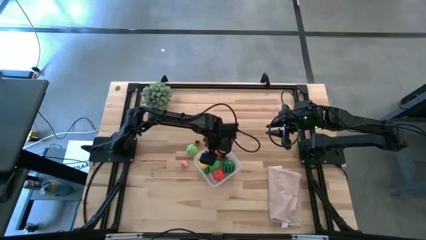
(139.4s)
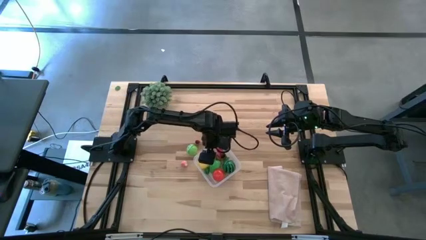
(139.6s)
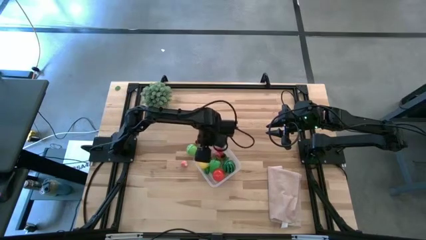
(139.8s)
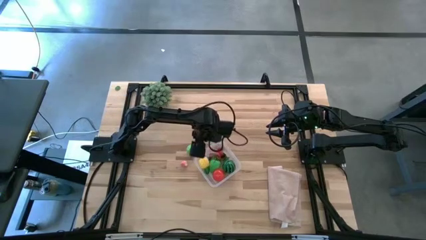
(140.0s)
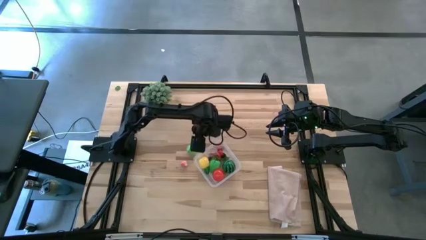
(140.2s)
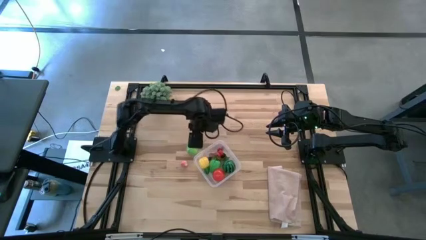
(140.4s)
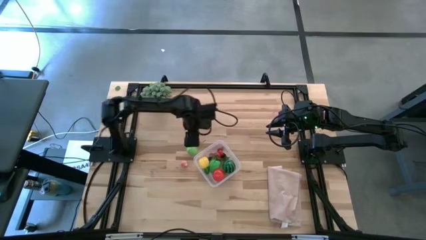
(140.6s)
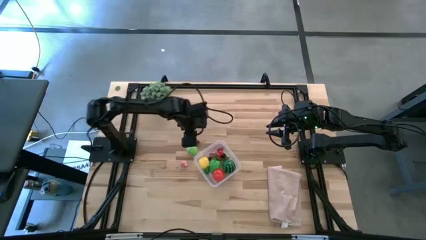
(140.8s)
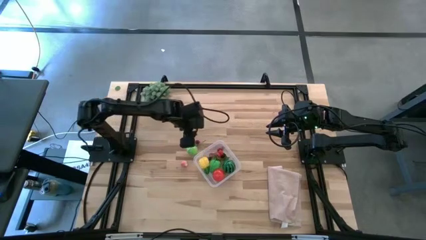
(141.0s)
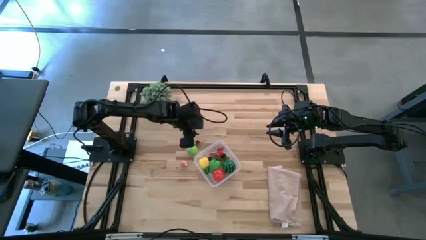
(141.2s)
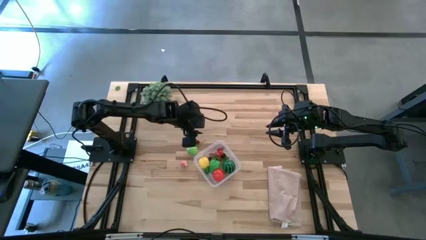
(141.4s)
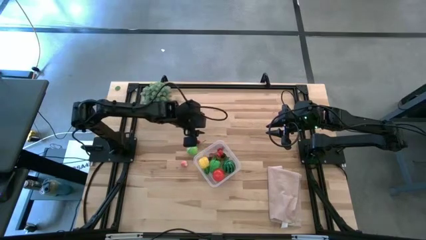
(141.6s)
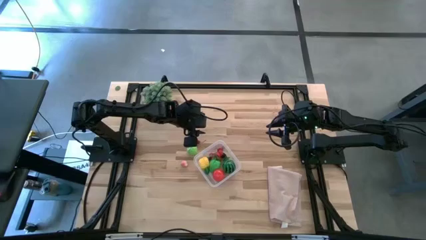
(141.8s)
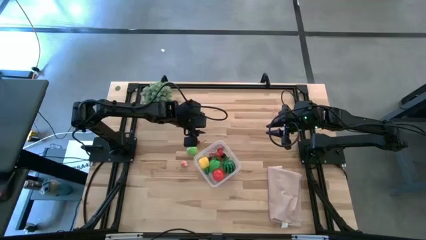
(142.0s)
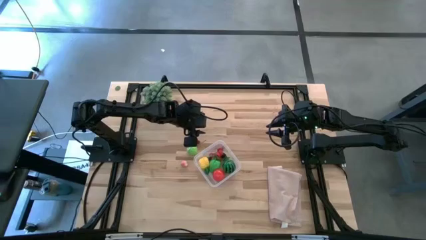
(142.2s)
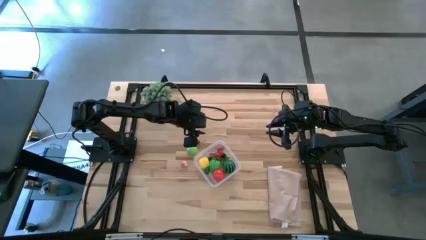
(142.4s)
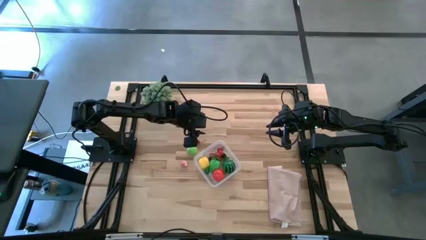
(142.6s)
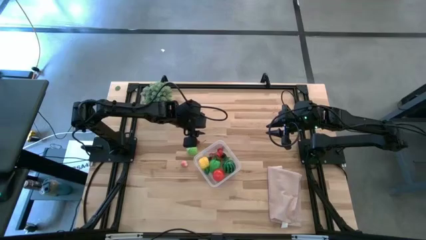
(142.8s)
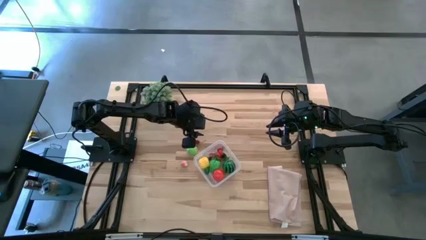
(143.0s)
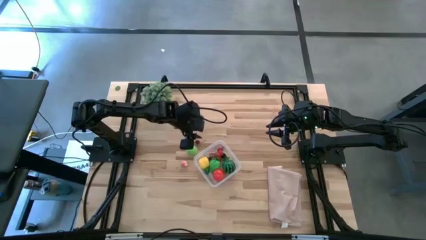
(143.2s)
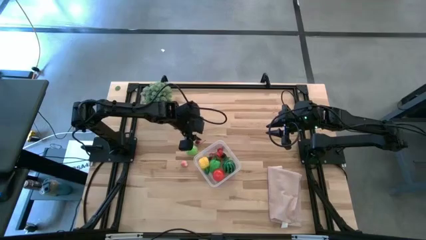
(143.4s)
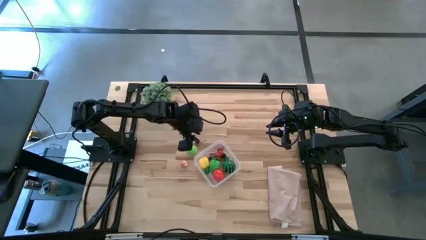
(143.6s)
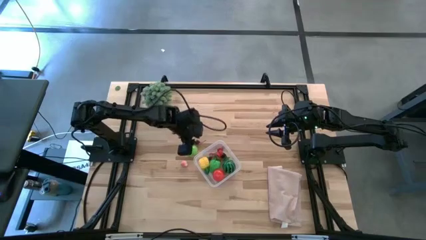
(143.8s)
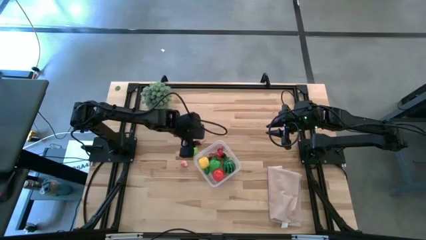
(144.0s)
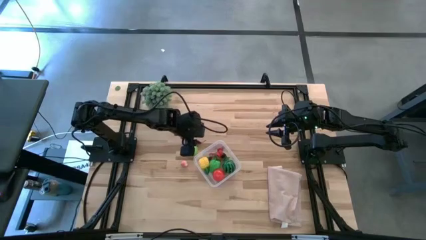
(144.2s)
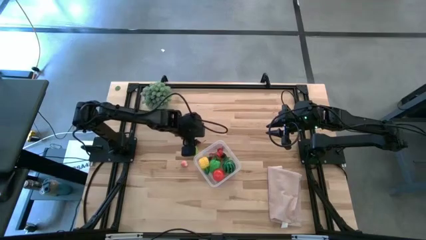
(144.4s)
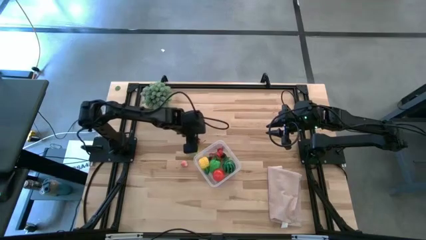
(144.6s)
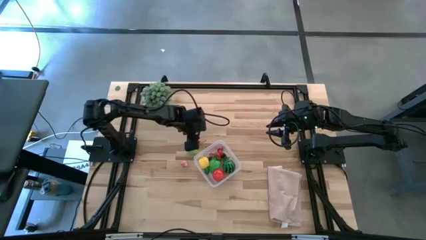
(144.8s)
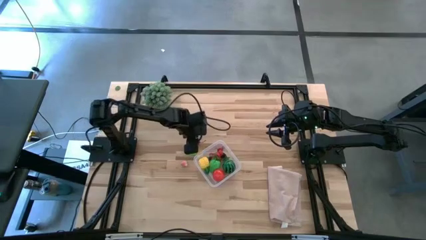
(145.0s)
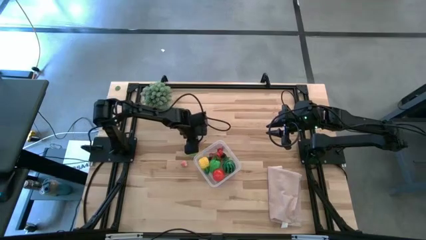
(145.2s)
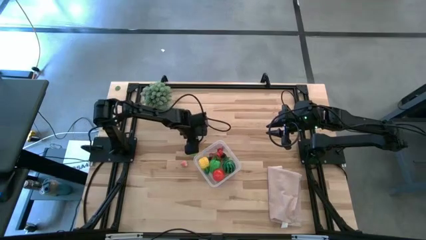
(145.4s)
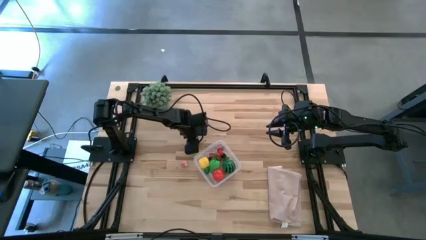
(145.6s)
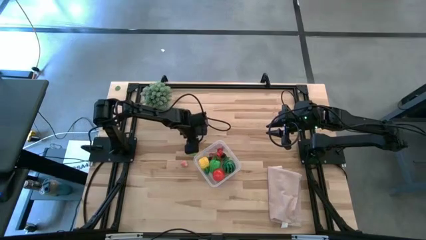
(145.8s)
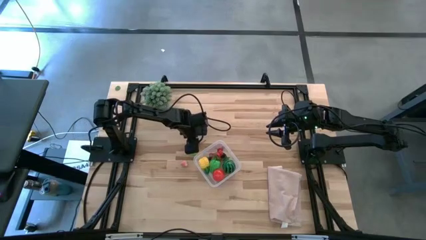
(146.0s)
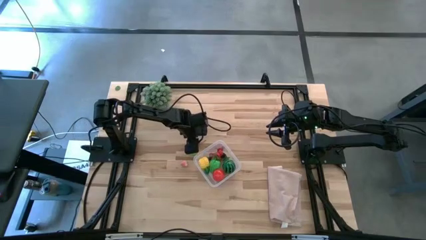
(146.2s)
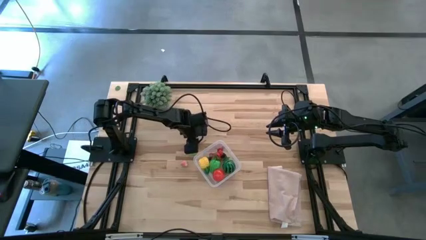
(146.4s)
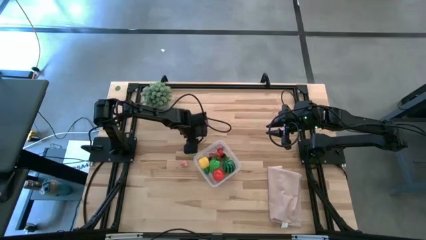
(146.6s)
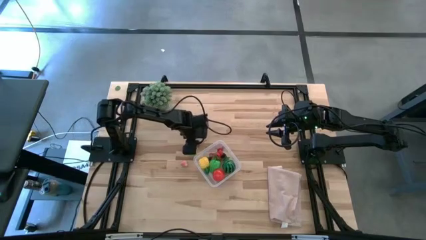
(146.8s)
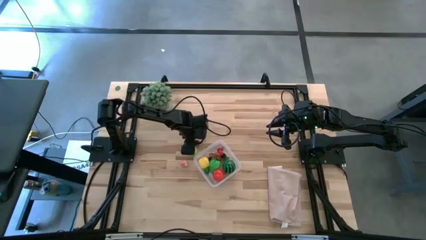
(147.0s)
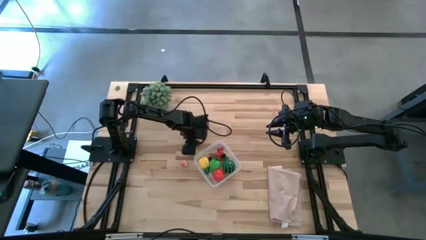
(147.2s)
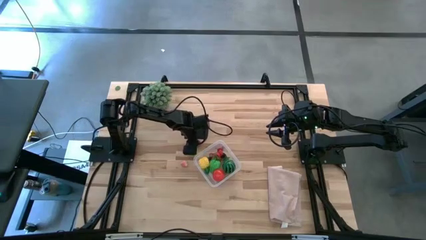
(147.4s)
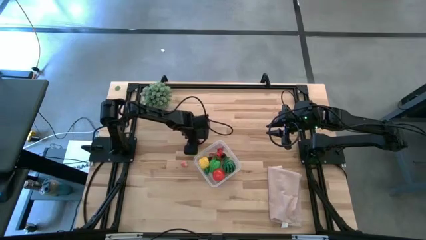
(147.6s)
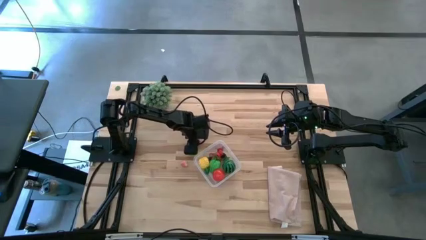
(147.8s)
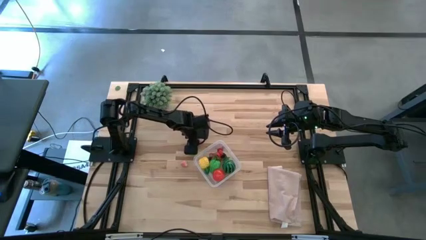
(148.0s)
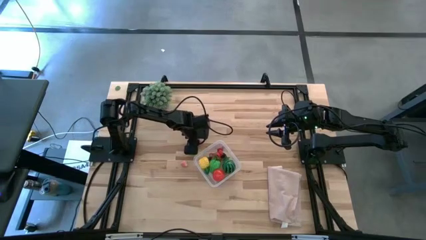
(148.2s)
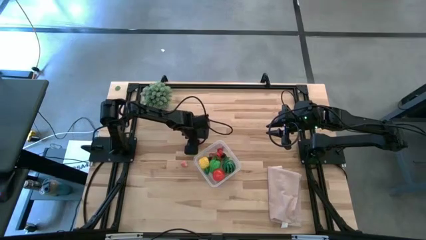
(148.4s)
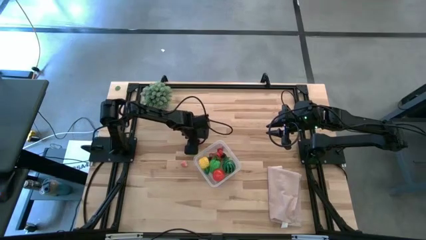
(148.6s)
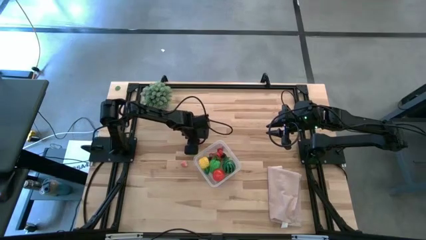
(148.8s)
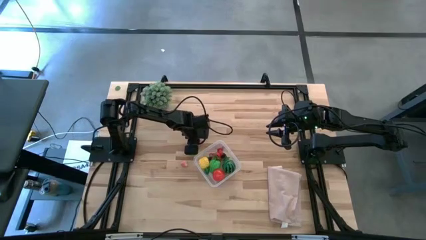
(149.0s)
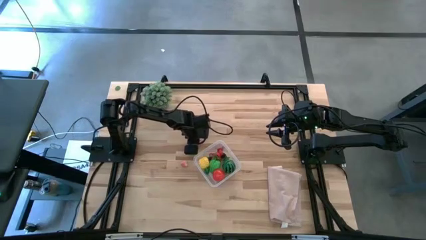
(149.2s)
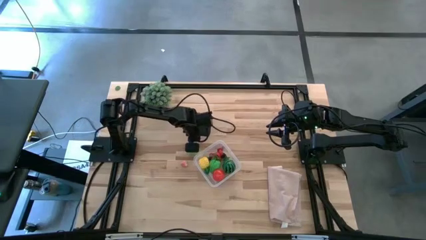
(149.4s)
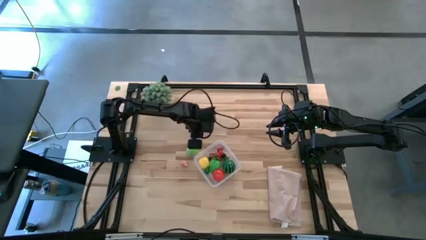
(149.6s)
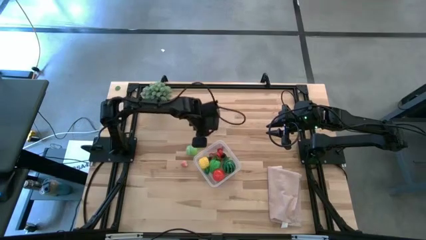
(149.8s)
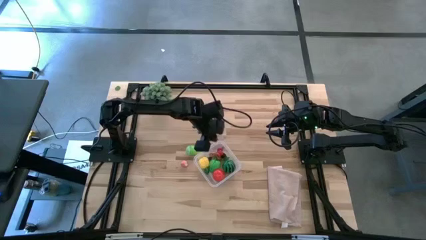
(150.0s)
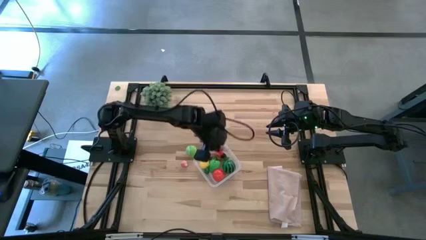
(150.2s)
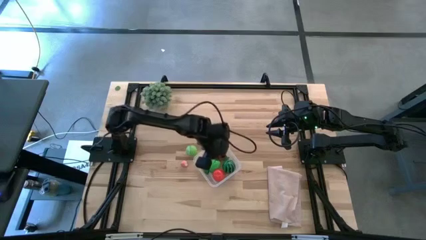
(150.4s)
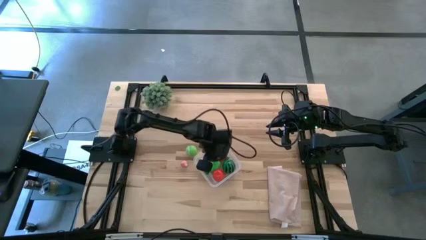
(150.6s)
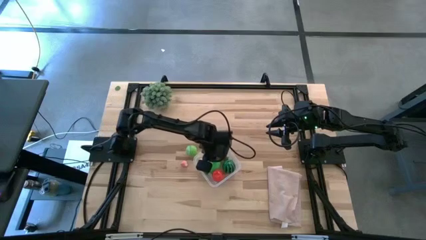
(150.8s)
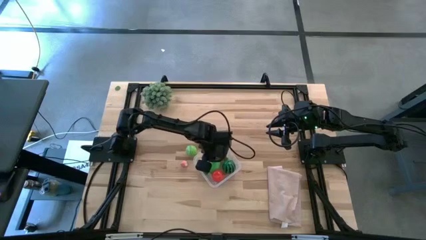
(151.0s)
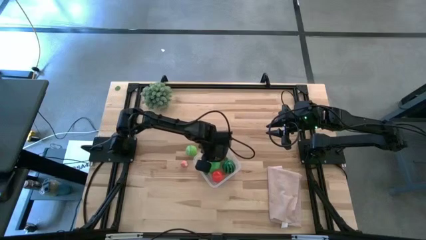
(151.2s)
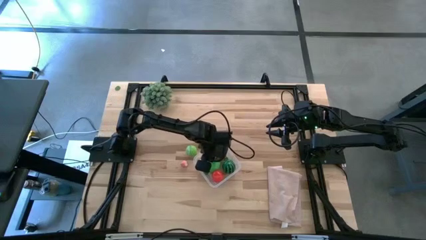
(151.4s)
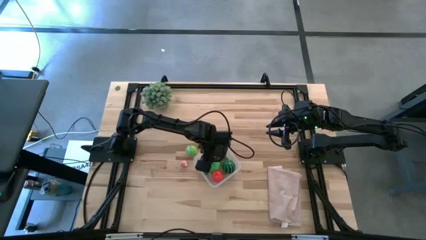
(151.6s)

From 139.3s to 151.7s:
Task: Pick and placing Produce into tupperware
Put the red cherry into the transparent bin
